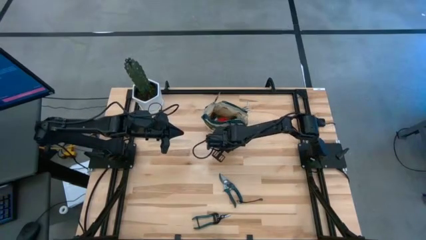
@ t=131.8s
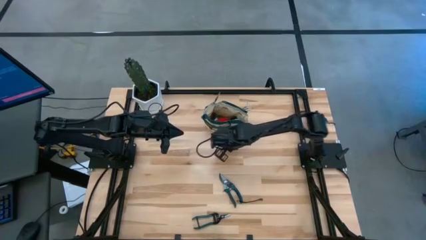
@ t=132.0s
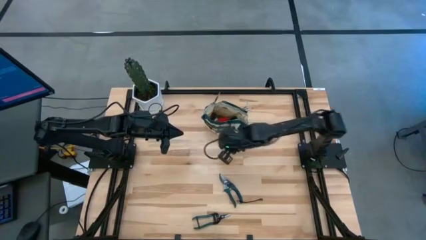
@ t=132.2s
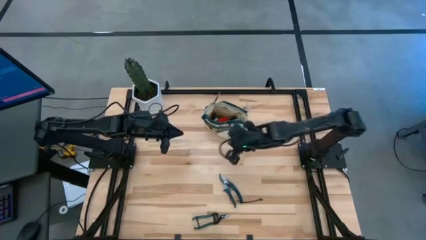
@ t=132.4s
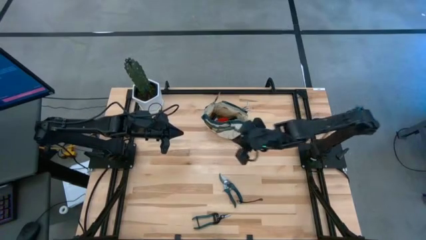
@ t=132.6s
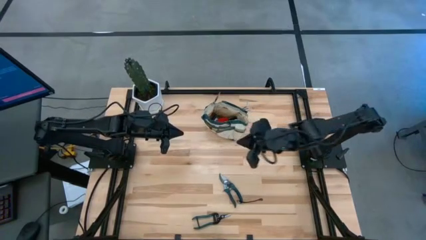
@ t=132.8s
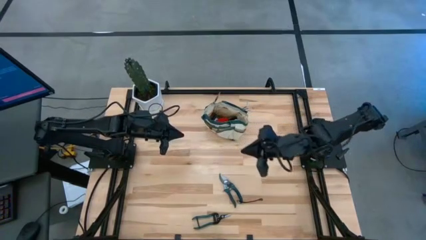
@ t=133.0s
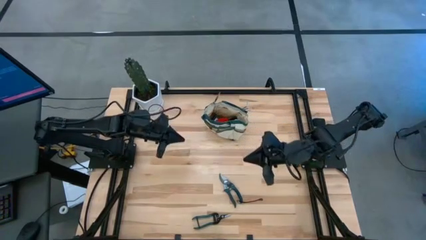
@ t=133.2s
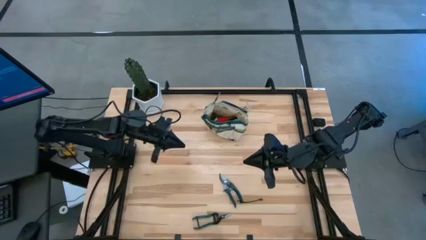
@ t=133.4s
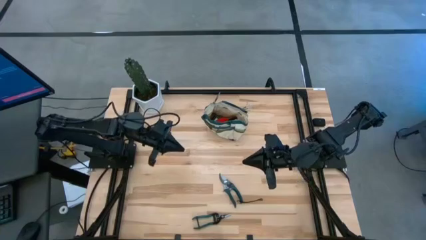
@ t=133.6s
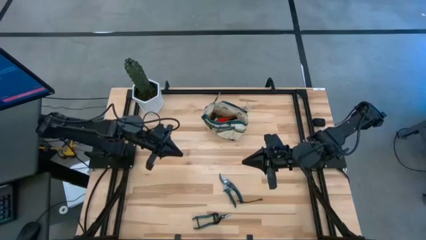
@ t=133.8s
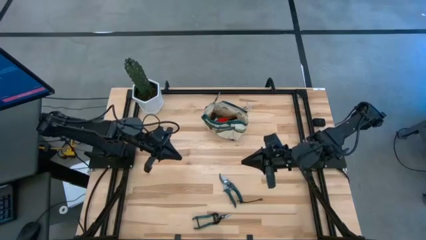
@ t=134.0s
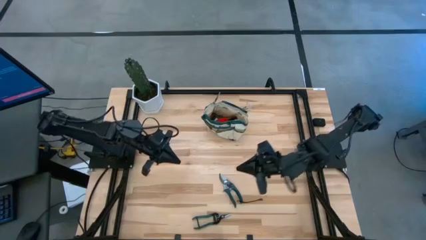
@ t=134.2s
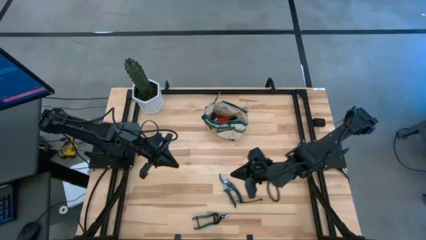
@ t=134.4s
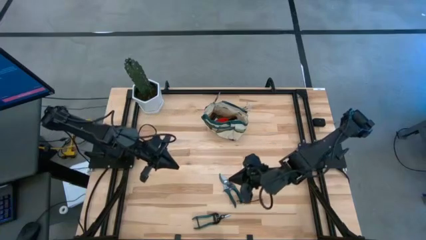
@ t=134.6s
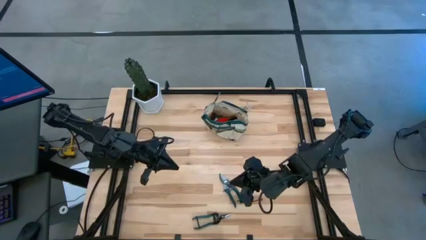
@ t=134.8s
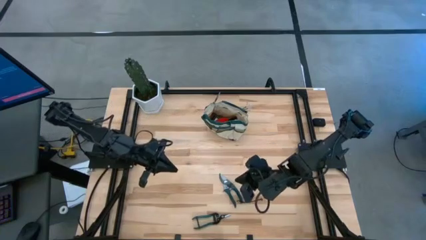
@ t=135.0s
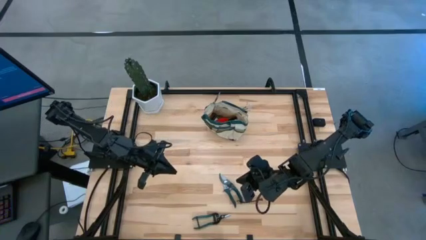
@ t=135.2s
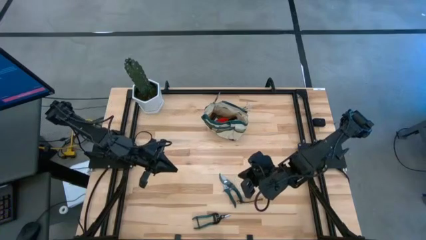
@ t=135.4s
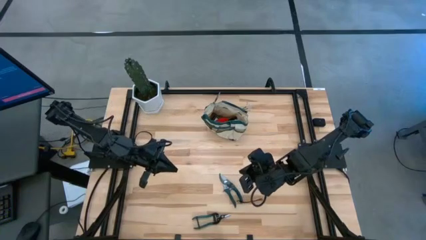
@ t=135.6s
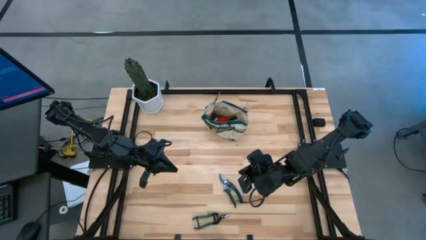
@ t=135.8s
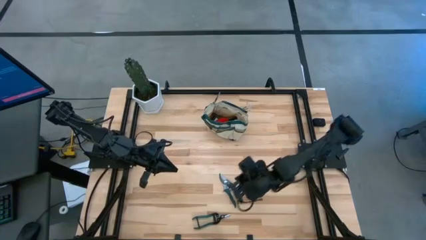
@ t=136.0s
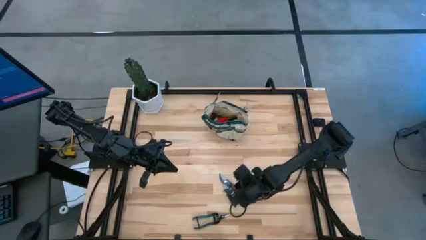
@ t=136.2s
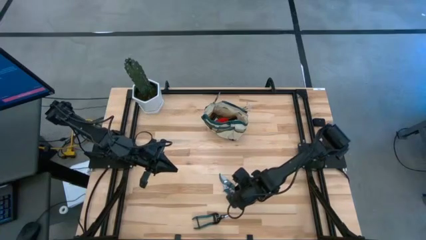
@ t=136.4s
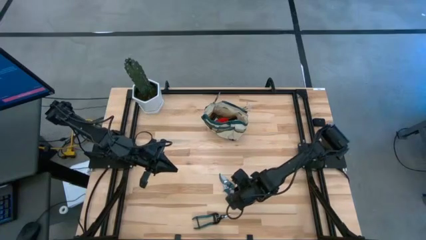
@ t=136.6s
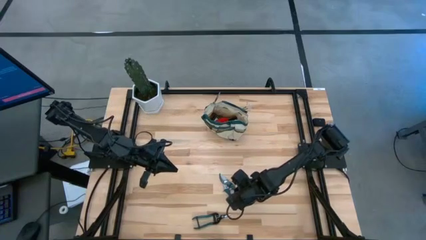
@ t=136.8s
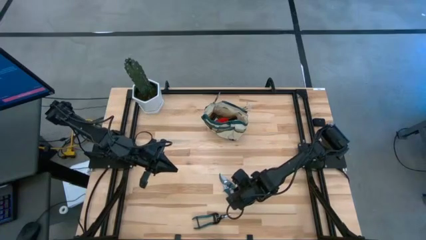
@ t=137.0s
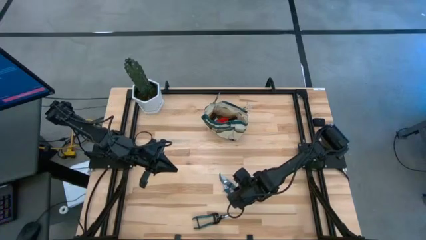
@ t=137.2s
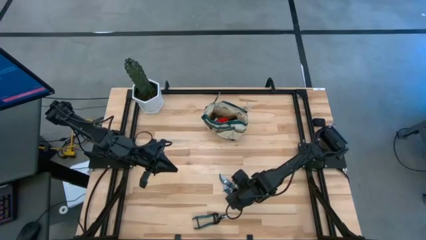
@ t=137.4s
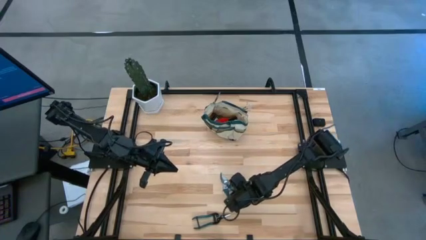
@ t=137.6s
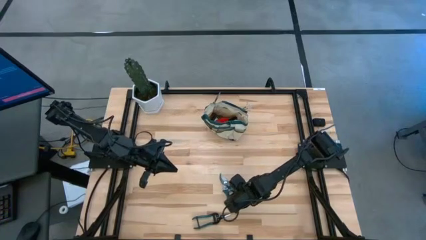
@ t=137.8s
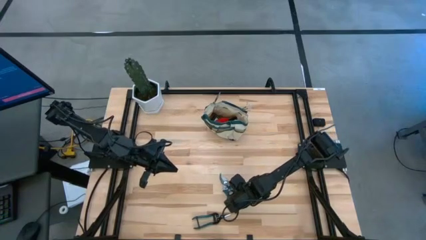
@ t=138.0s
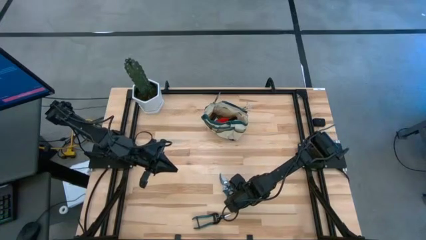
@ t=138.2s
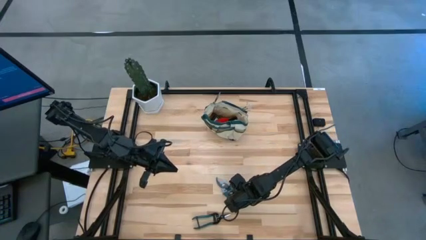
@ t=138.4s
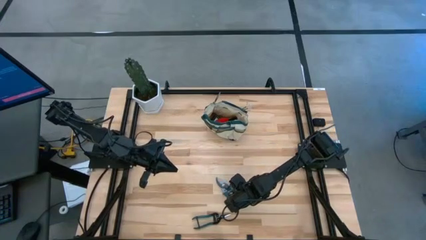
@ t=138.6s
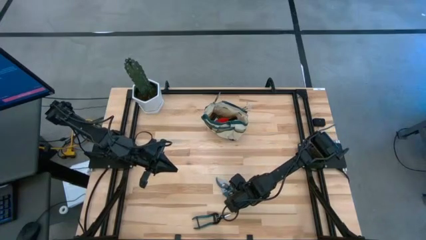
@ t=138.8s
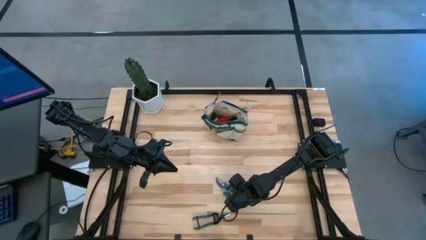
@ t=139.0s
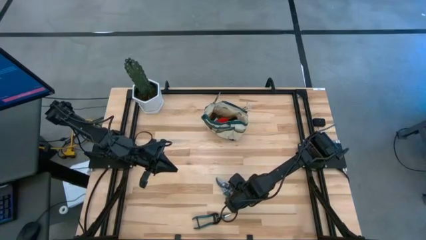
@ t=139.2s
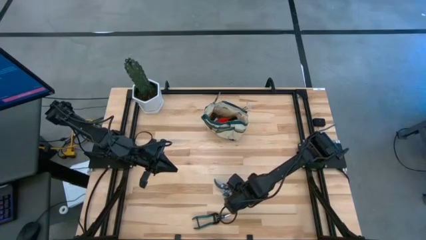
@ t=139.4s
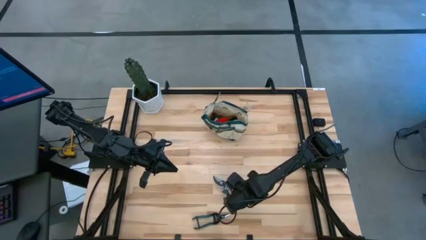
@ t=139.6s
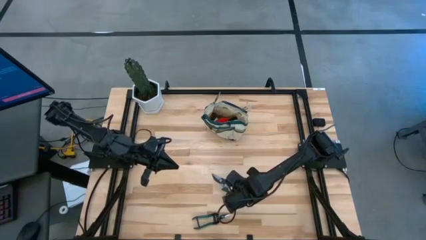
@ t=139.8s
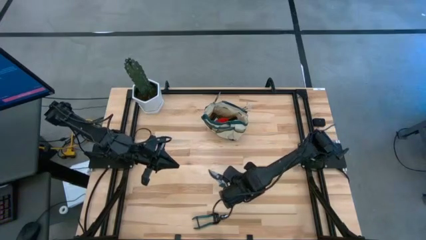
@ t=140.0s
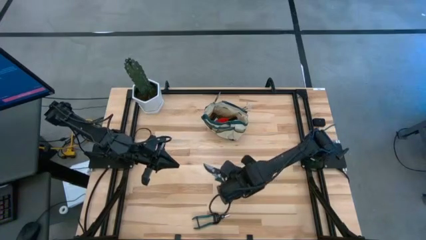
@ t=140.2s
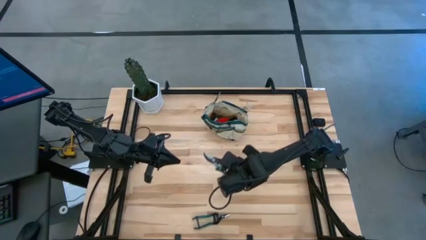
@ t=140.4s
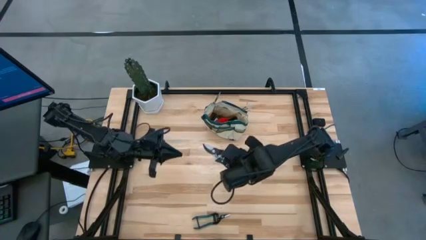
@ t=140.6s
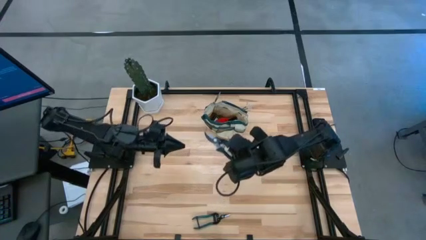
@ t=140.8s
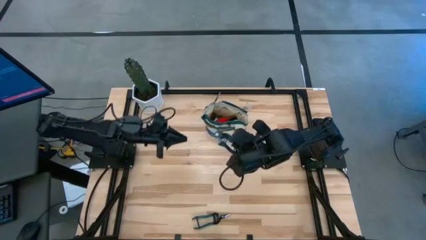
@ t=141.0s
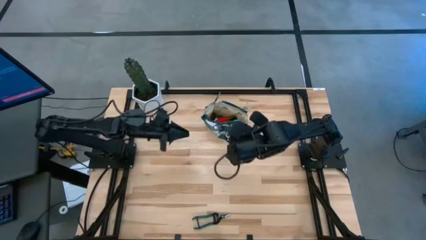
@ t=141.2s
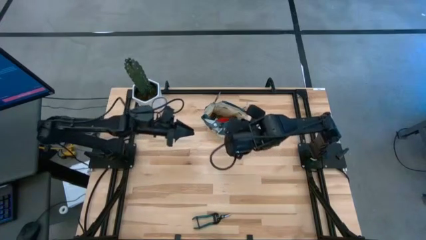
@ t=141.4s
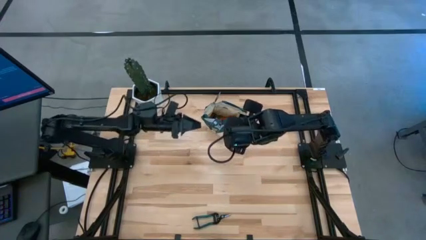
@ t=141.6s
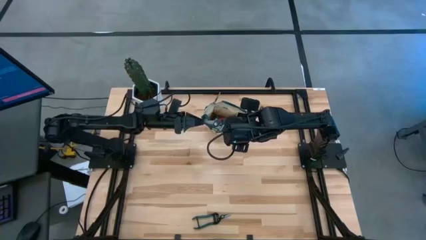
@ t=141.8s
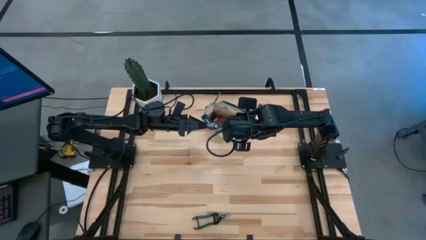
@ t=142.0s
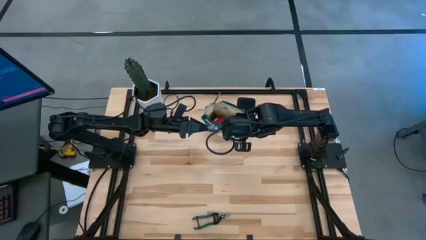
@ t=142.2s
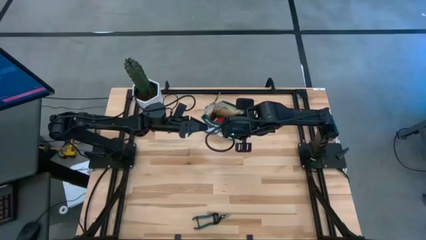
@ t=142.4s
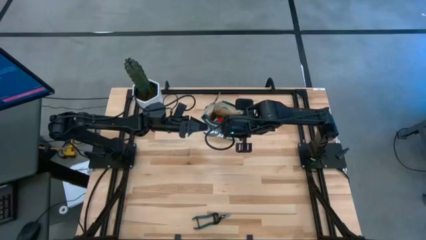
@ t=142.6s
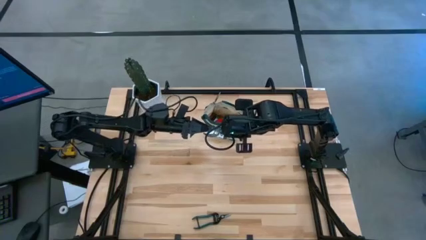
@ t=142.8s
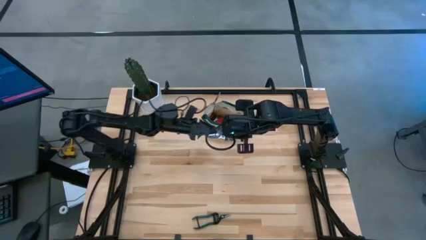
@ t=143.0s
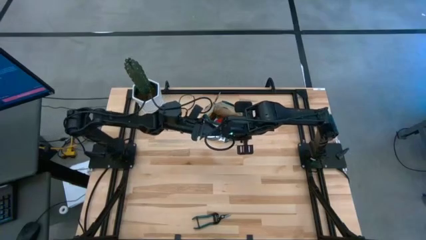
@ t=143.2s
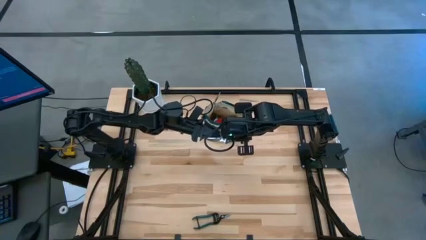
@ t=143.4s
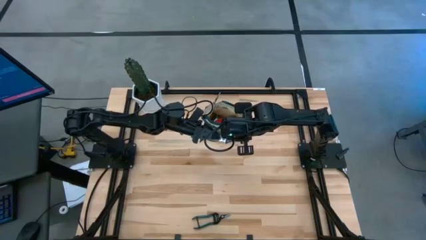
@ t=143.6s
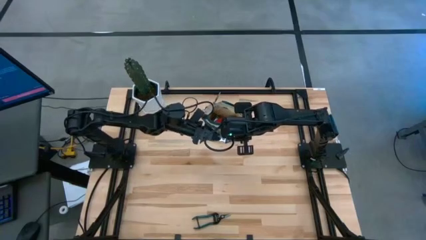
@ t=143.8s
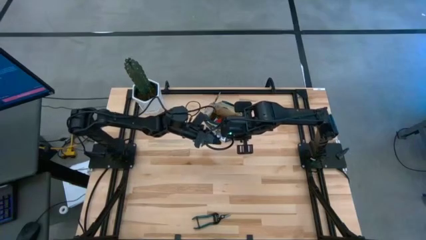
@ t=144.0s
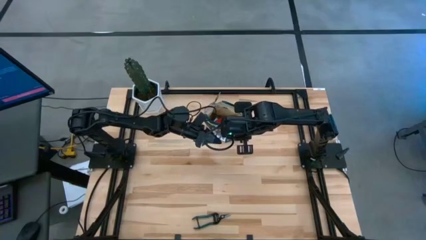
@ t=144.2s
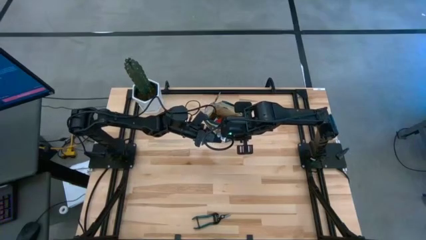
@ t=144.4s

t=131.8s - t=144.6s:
Task: Pick & Place Garden tools in Gardening bag
Put the shear scissor into the side pocket of the gardening bag
